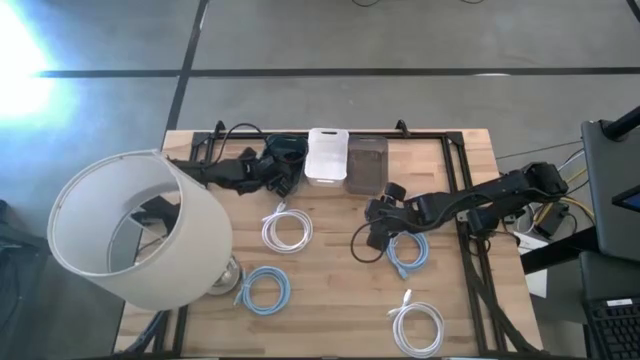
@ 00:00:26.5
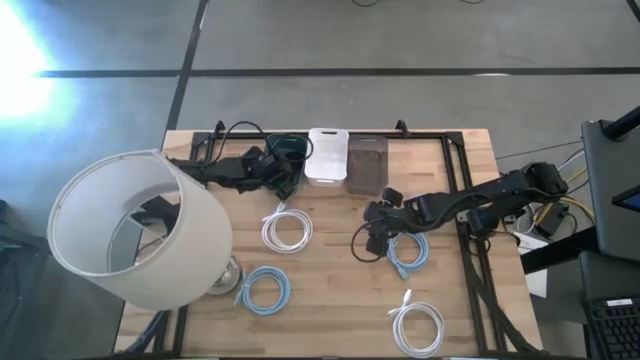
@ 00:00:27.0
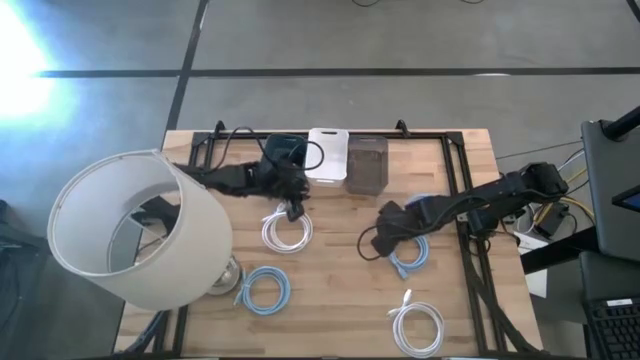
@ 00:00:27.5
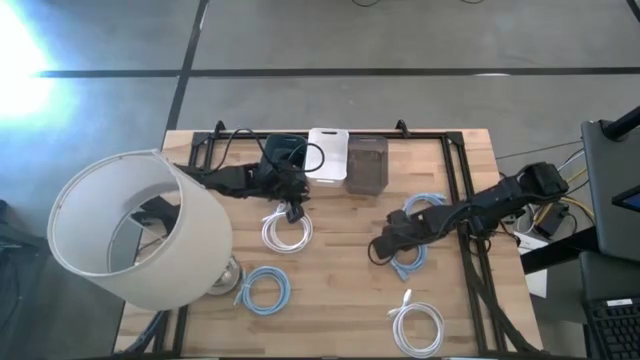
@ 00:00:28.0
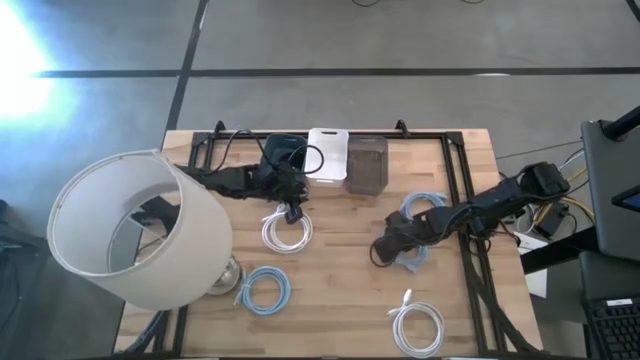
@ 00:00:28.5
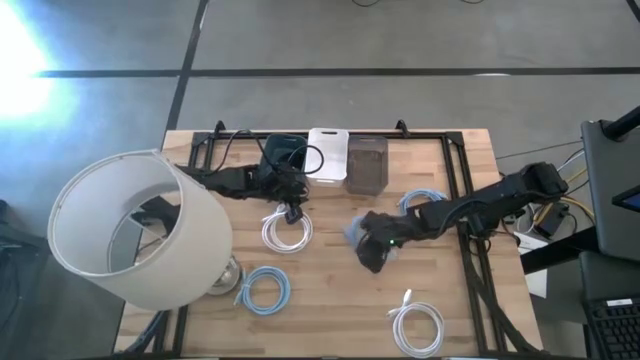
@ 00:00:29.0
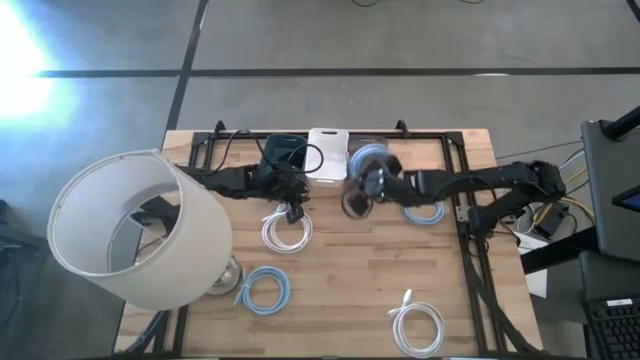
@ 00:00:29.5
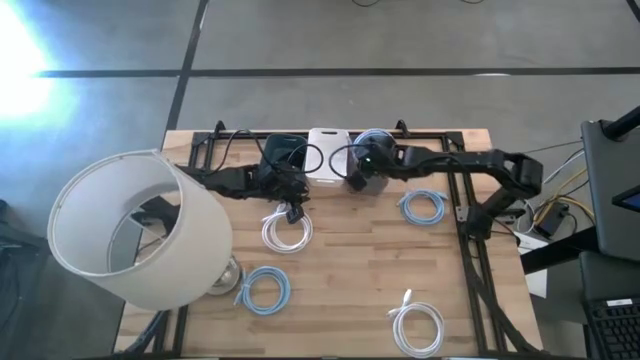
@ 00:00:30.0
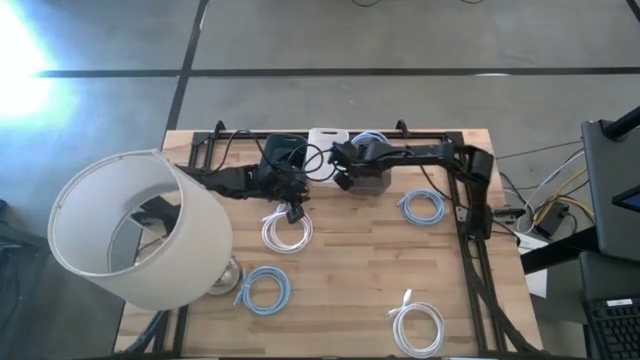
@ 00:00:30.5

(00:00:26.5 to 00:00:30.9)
Task: Pick & Place USB Port
Put the middle right light blue HDMI cable into the black bin

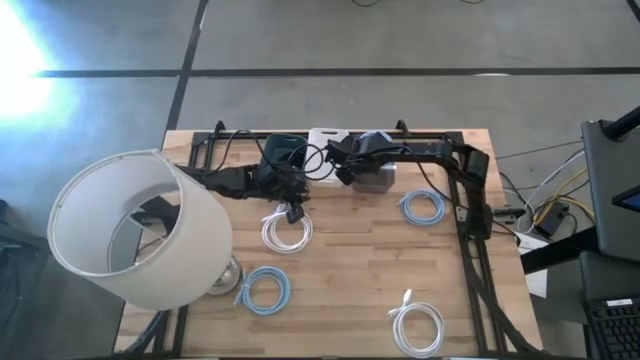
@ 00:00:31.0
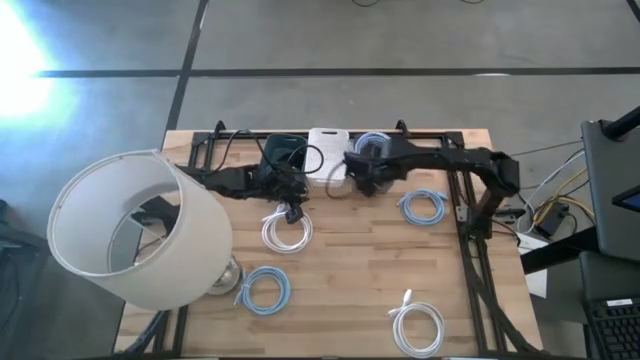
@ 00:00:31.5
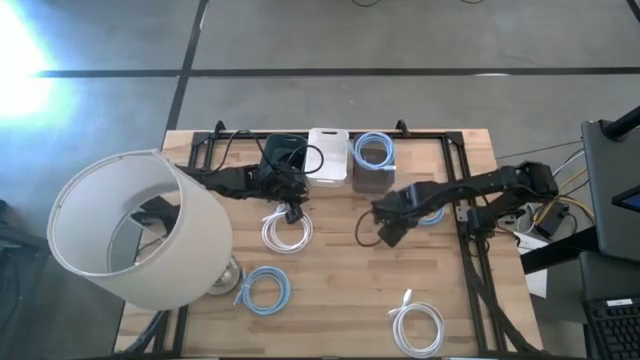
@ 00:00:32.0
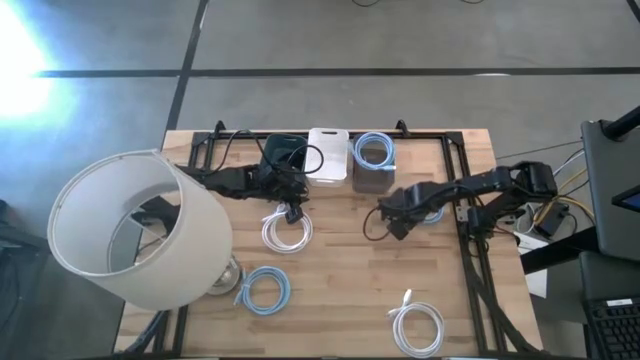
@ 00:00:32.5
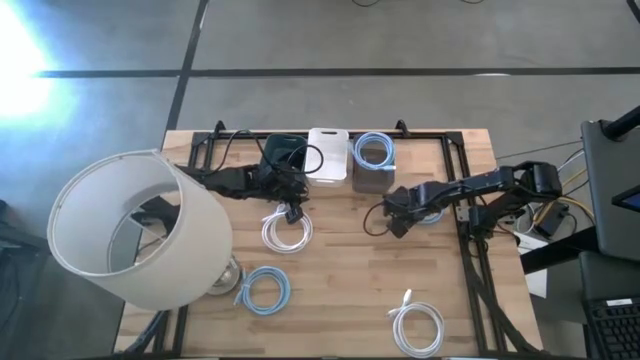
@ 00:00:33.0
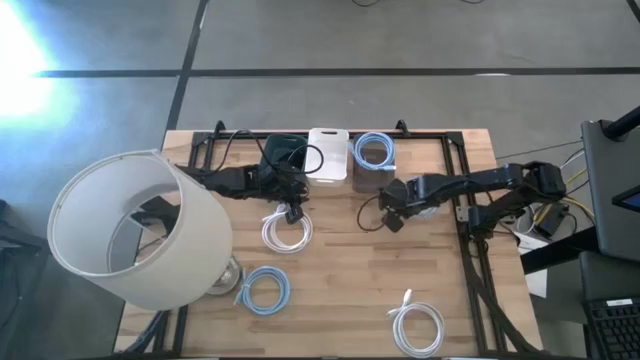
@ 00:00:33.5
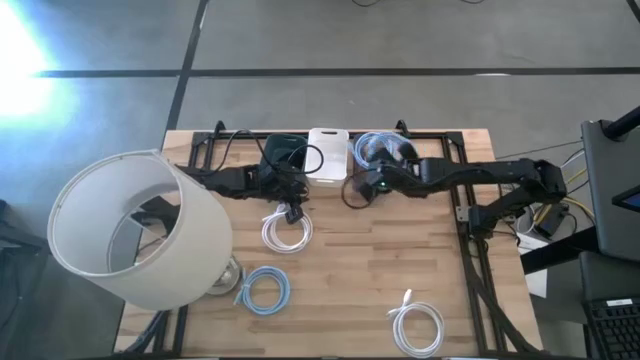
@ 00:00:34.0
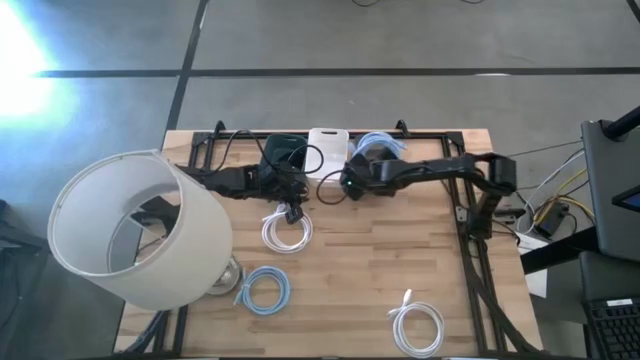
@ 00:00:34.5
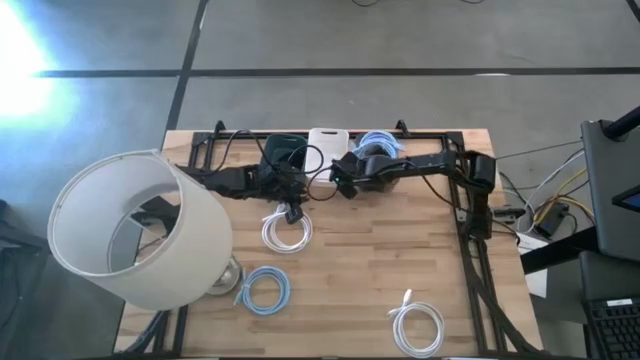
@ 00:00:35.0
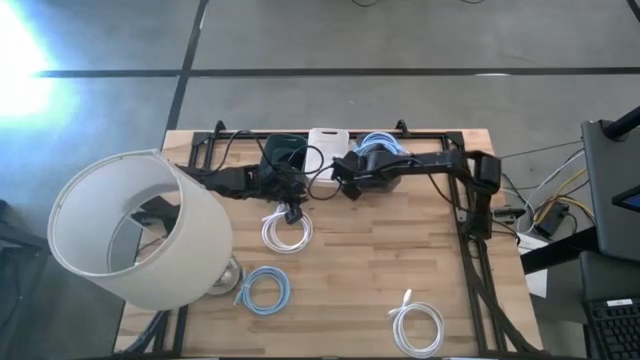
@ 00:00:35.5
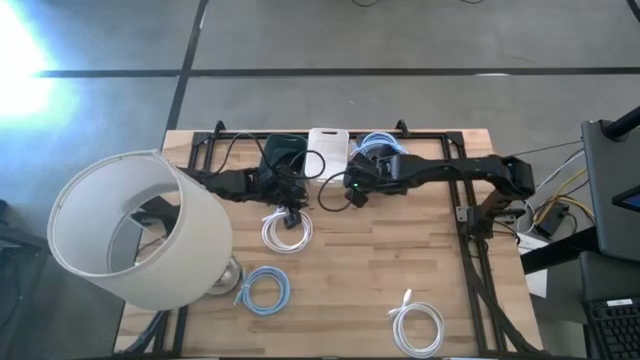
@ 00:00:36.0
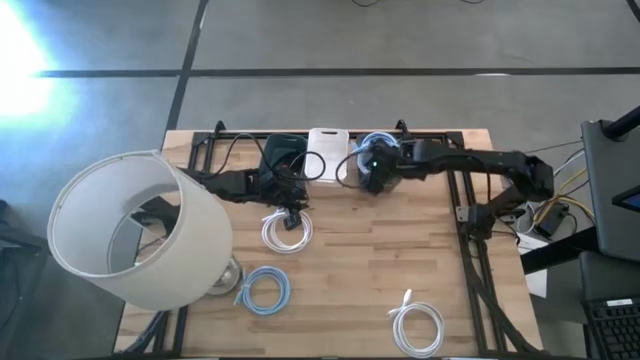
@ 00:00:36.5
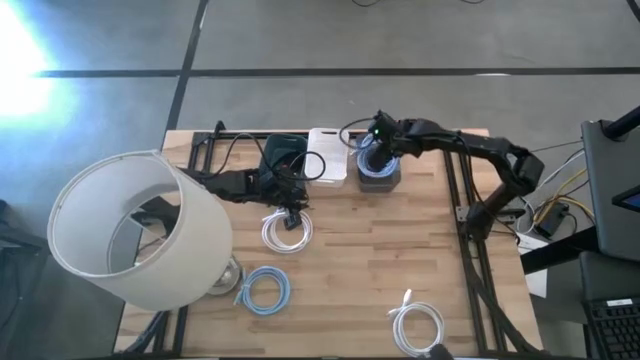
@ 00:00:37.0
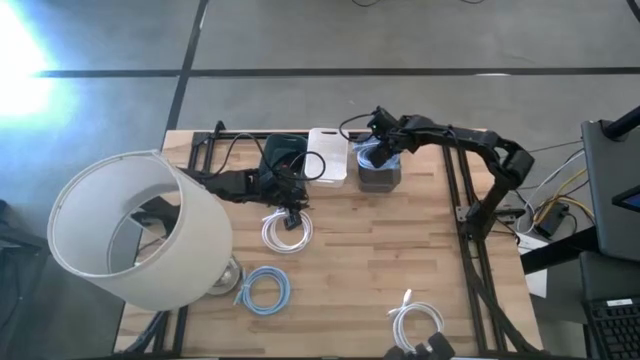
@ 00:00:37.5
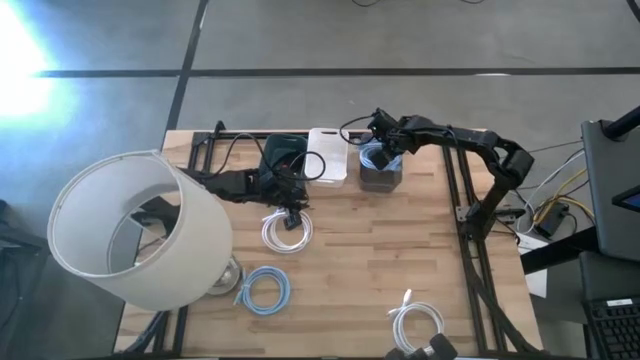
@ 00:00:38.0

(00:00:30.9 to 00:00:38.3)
Put the top light blue HDMI cable into the black bin

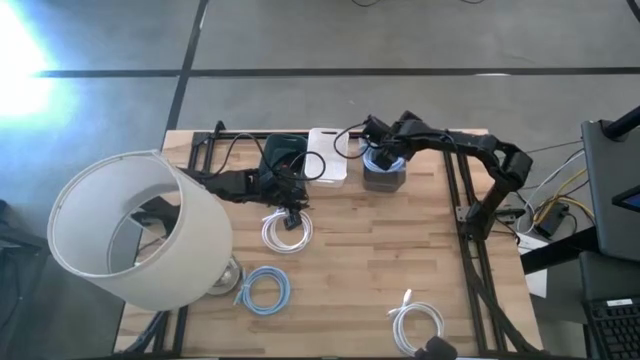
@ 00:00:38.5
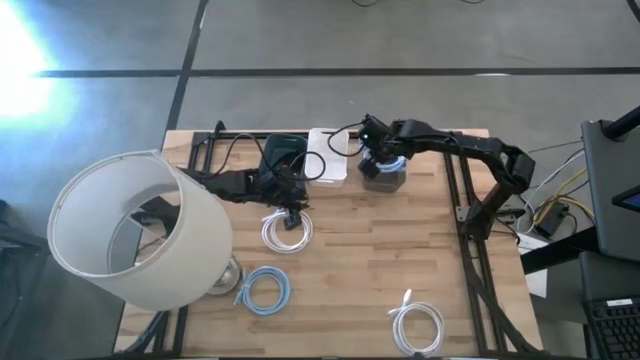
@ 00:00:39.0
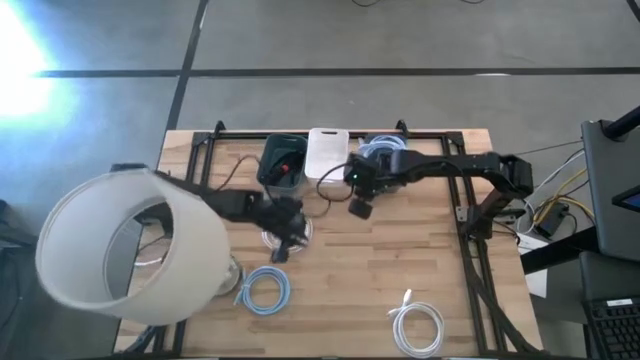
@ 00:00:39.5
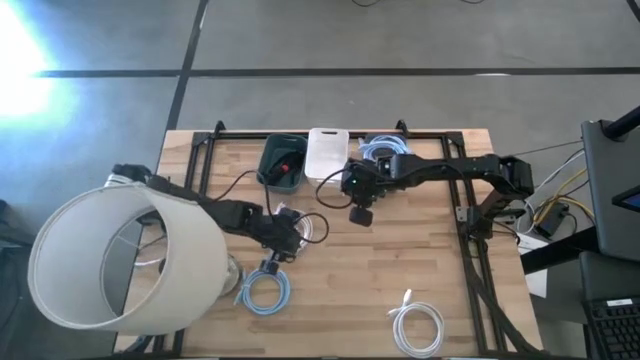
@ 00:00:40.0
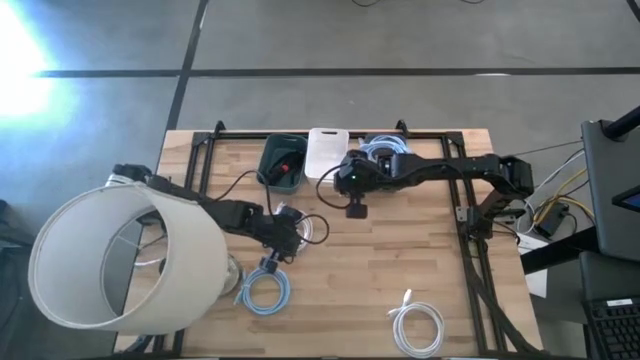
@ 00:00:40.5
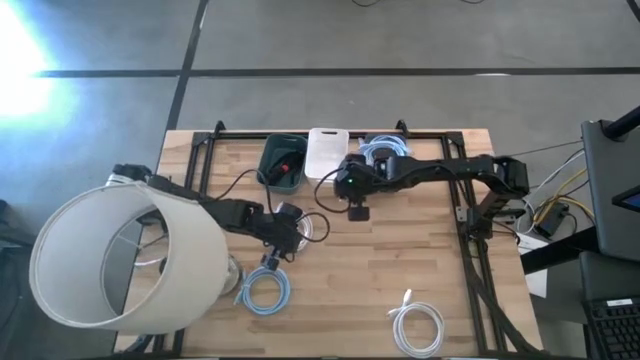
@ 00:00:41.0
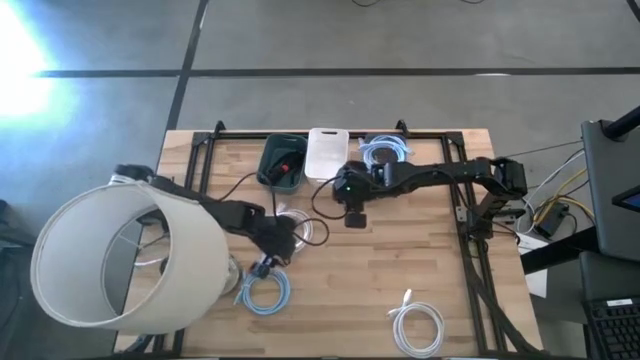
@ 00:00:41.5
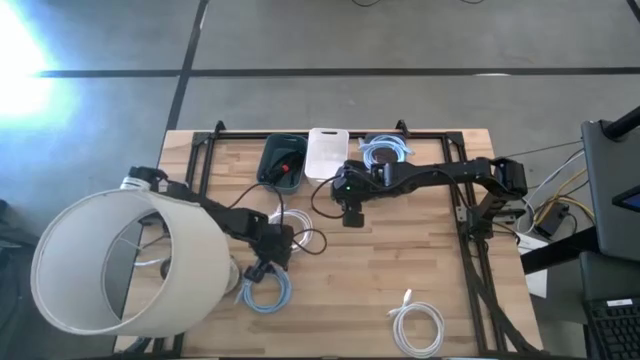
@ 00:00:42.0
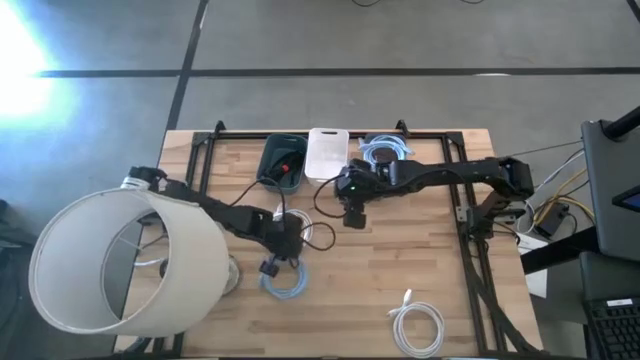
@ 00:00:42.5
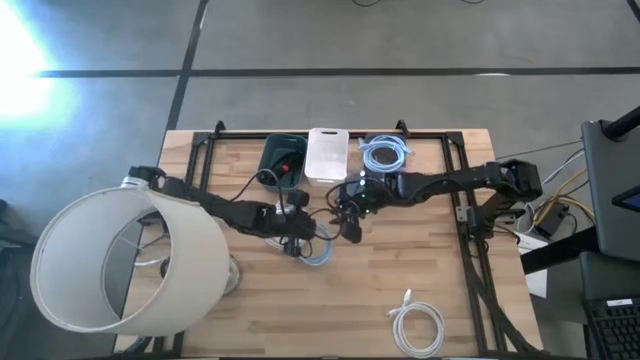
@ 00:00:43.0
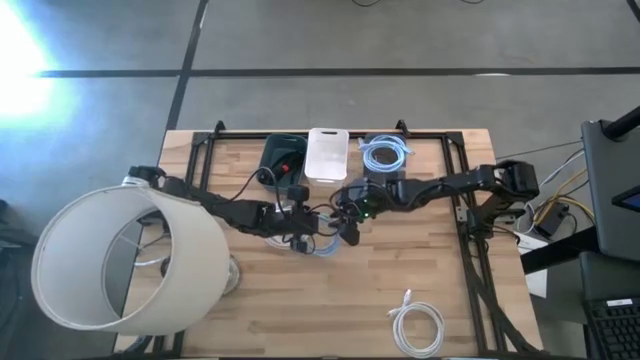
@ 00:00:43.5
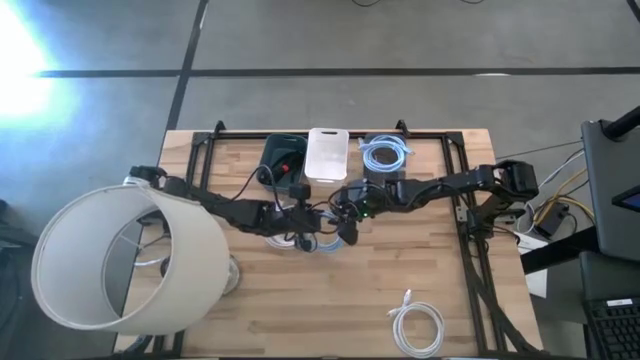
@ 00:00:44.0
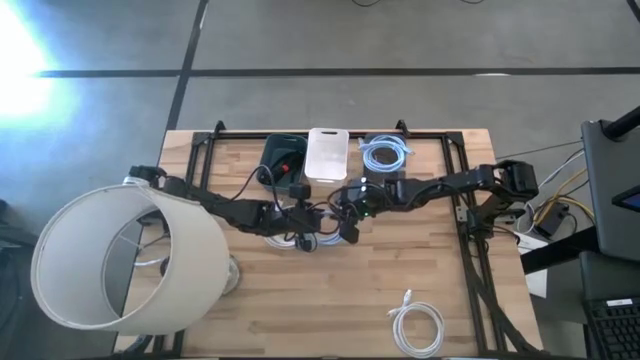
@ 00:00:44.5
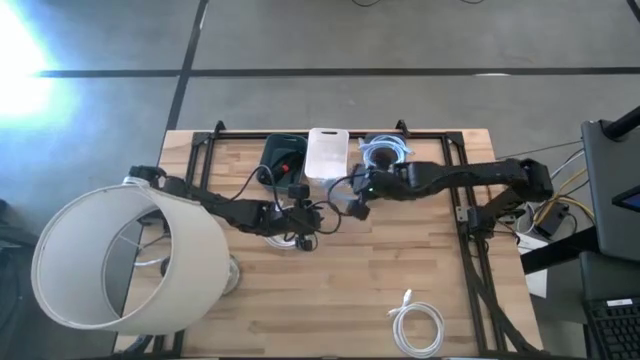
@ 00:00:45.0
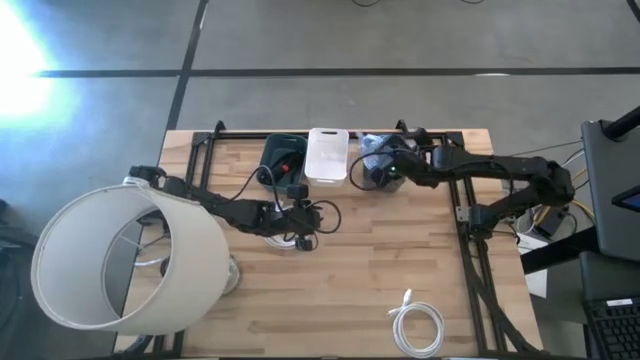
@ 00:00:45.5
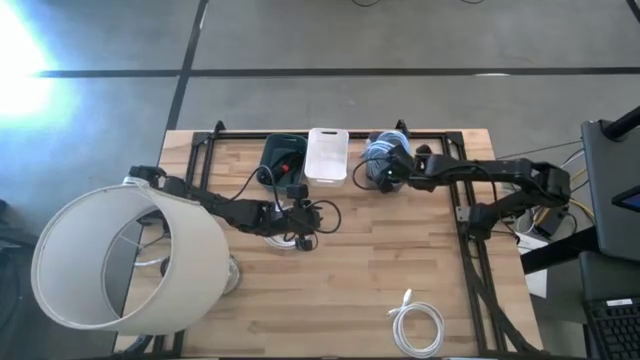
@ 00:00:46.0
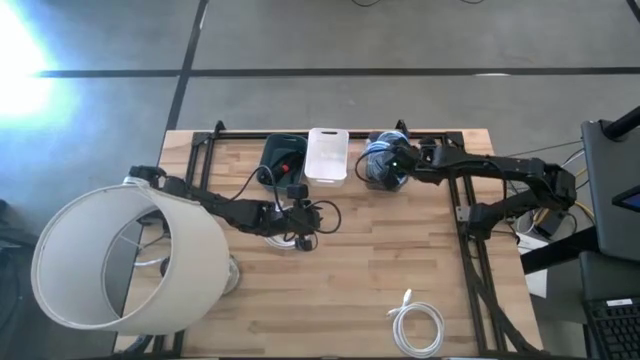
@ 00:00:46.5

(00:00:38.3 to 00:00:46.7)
Put the light blue HDMI cable into the black bin

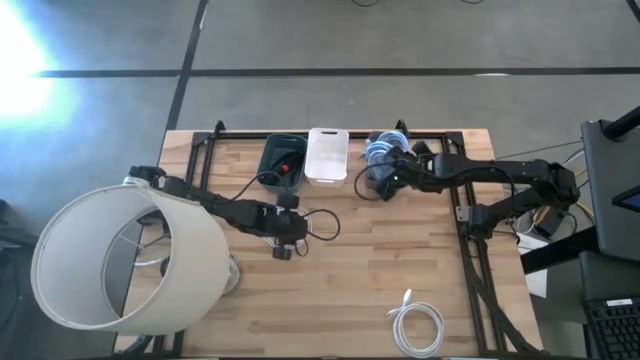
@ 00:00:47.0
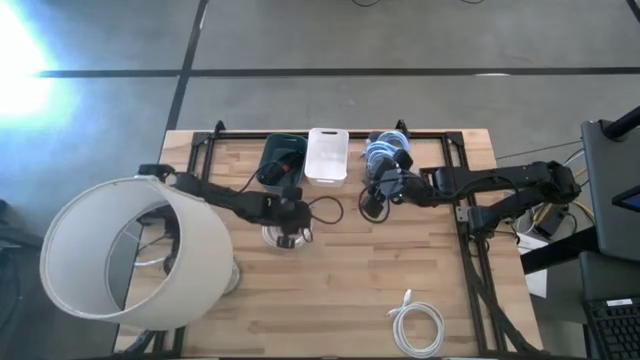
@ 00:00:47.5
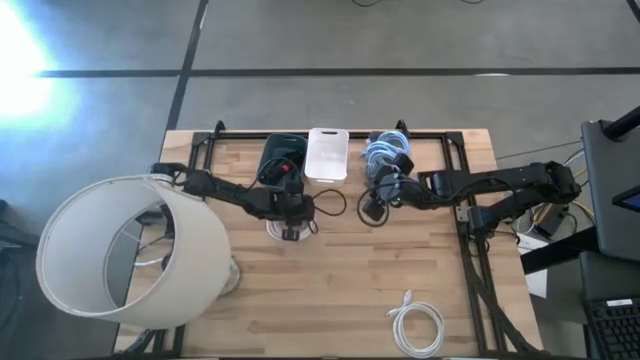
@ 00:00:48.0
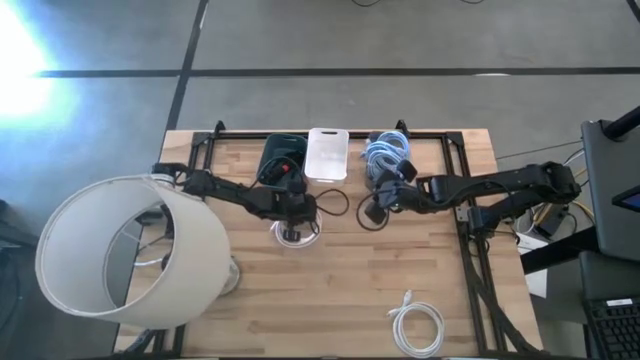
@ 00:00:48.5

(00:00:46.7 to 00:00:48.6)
Put the top white HDMI cable into the white bin
